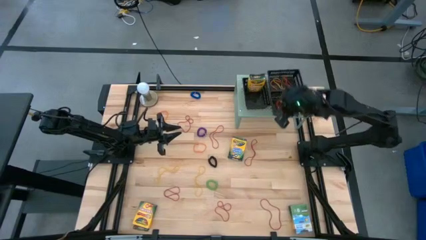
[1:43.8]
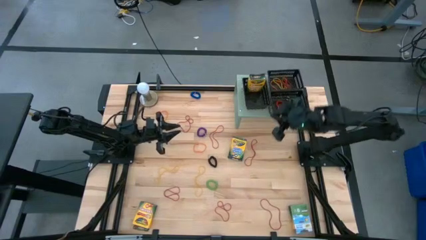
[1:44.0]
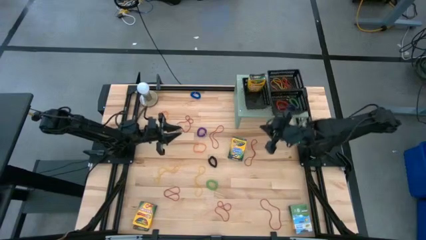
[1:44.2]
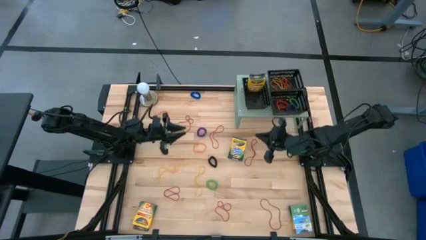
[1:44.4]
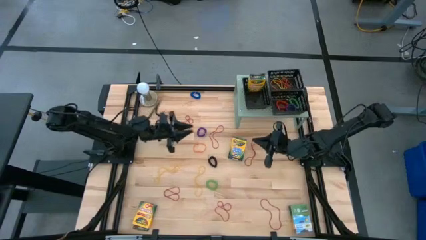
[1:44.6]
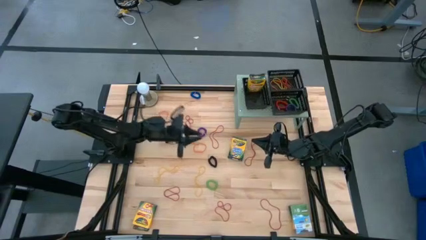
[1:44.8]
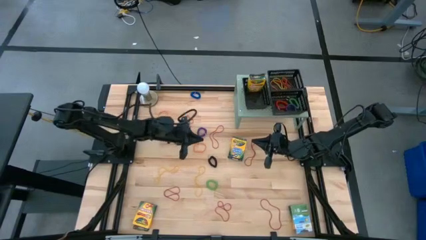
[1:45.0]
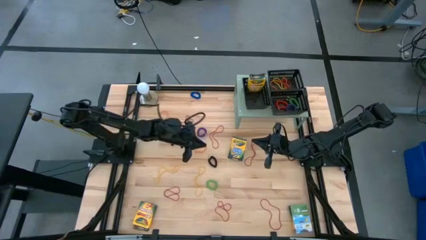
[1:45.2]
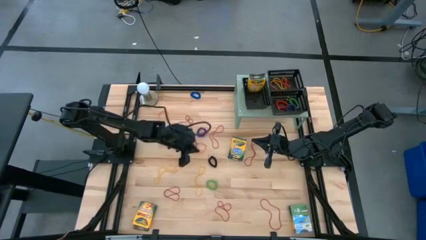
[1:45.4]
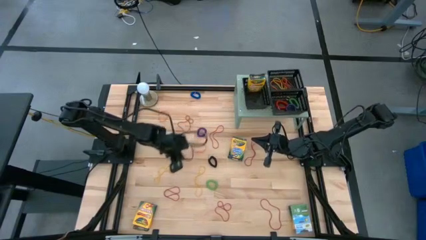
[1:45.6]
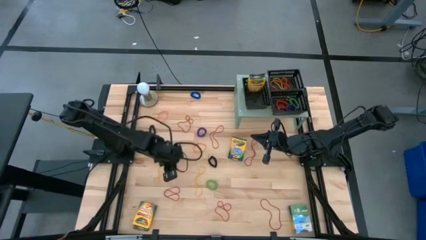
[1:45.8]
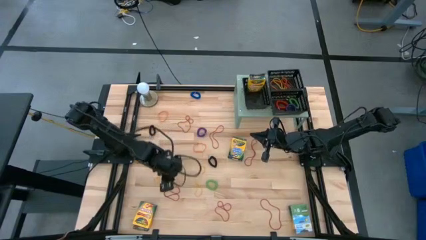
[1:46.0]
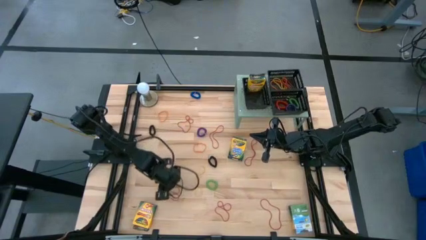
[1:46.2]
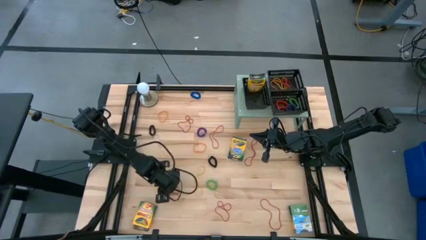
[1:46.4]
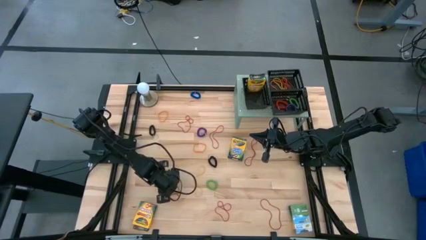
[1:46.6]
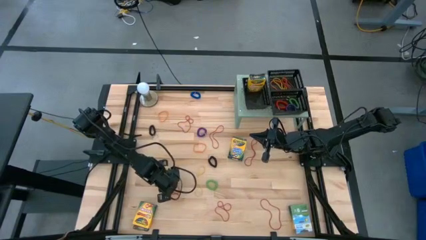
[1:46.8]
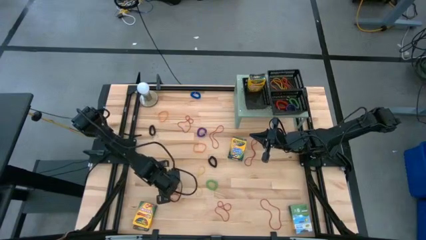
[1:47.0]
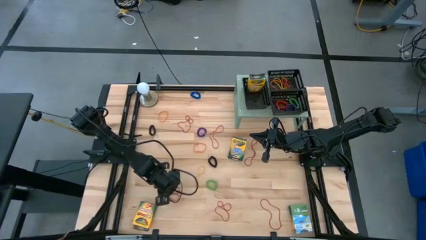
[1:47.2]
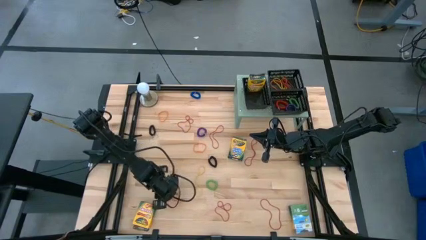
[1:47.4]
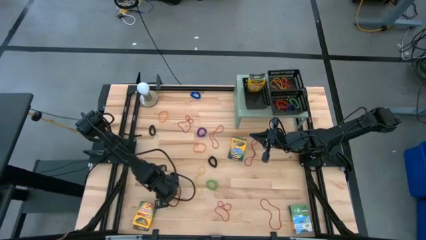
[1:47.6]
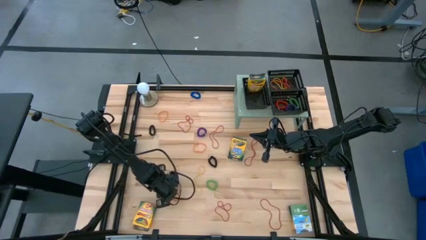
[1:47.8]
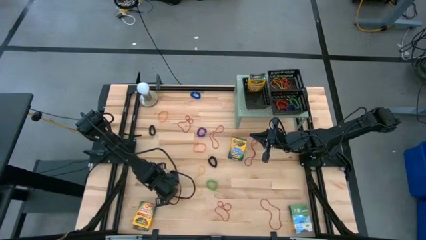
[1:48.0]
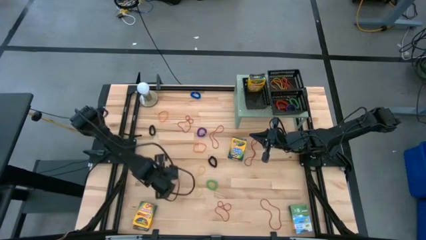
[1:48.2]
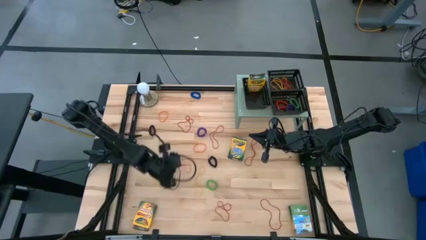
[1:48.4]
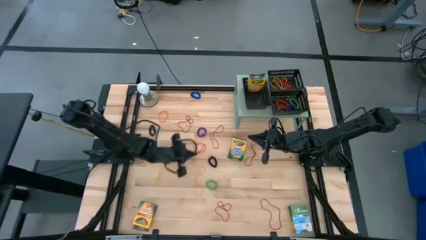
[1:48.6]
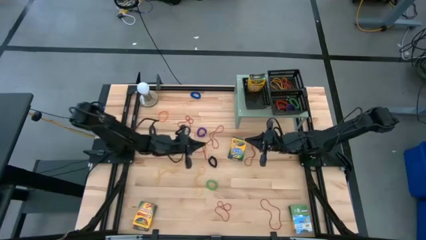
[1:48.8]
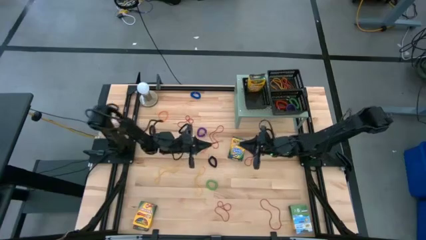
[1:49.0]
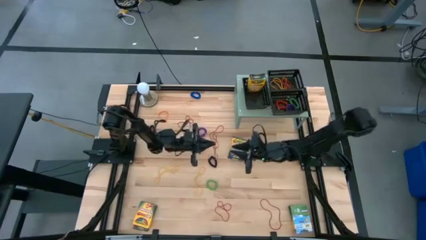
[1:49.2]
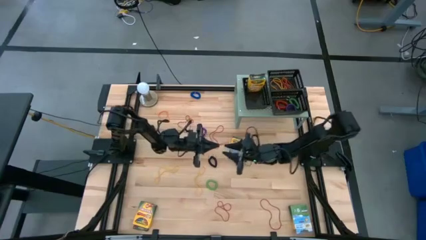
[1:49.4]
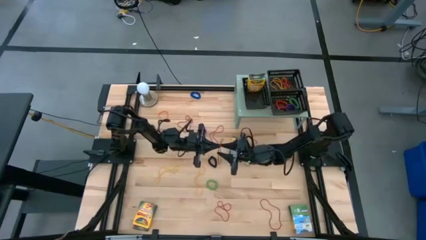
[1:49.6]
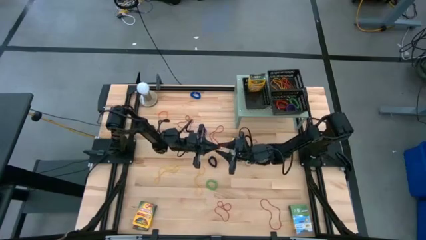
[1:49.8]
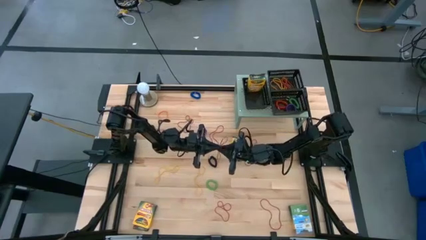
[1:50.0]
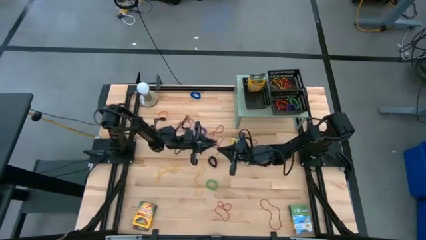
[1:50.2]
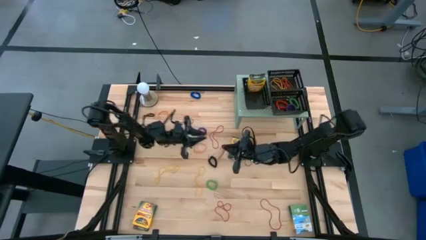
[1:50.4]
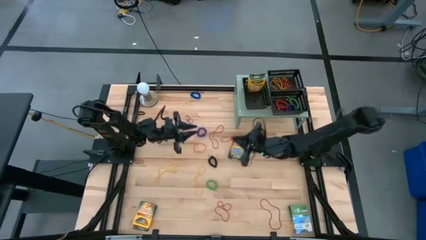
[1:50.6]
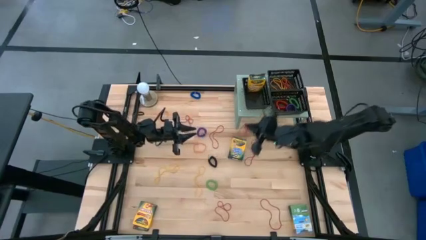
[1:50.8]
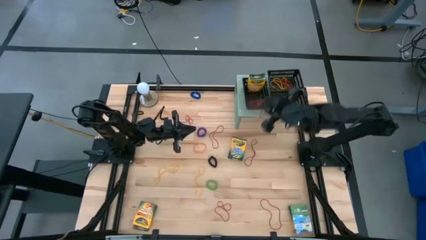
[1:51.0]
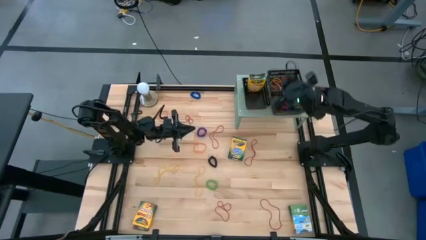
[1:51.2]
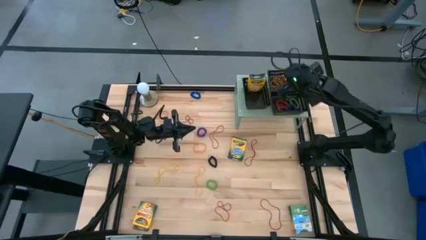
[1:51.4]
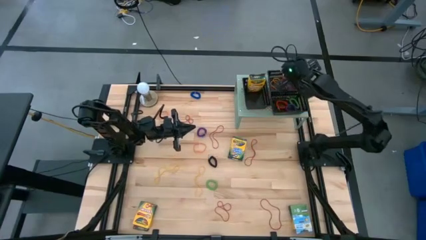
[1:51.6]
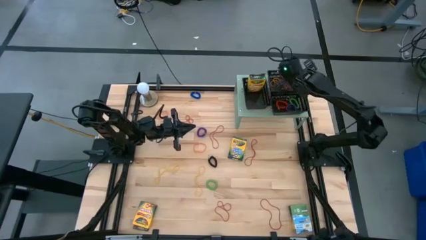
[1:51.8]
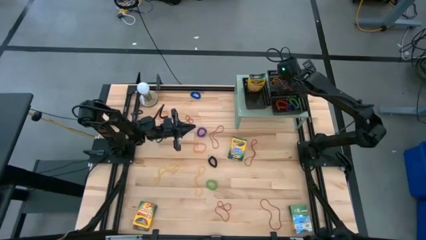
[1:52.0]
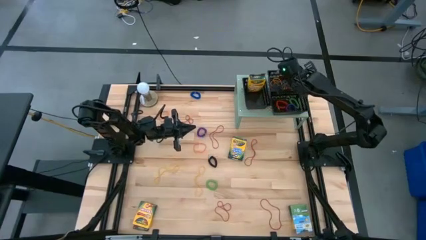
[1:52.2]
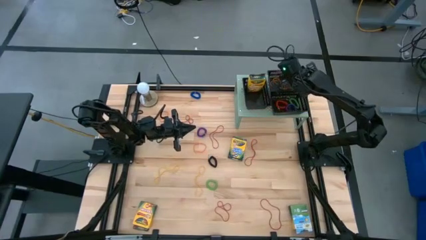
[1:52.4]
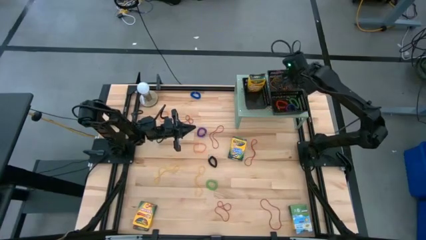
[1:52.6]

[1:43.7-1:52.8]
Task: Pick & Place Office Desk Supplies
Put the red rubber band into the top right black bin on the shelf

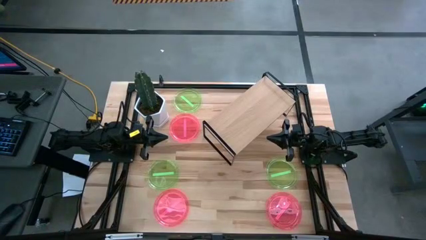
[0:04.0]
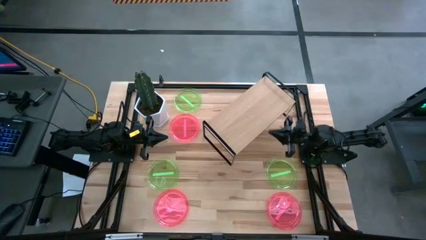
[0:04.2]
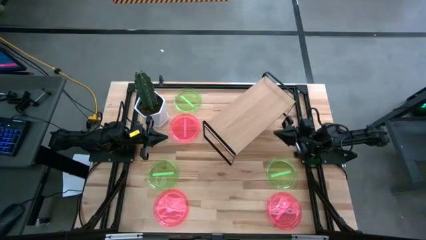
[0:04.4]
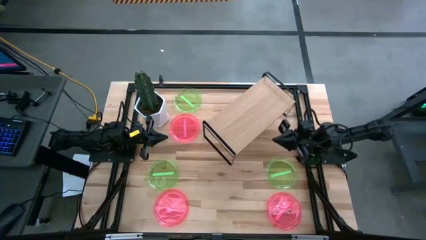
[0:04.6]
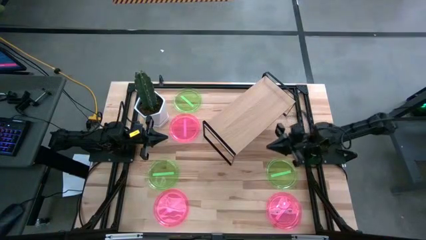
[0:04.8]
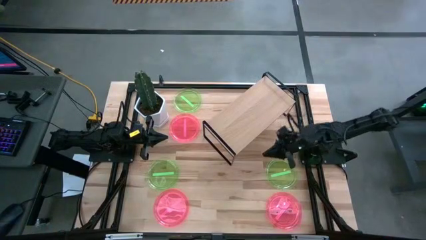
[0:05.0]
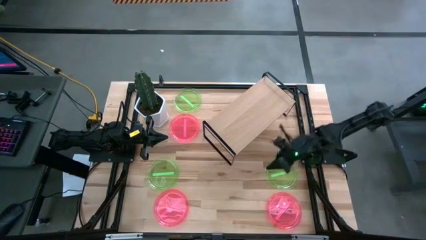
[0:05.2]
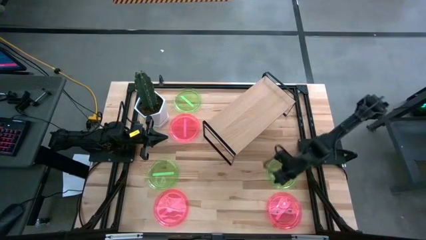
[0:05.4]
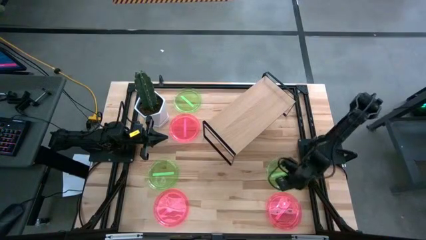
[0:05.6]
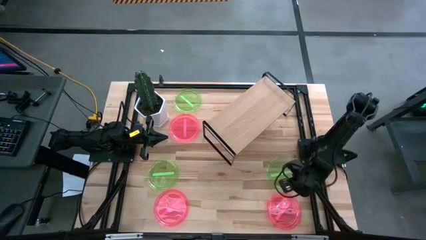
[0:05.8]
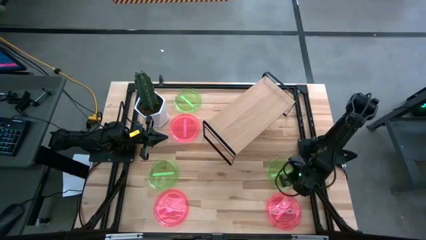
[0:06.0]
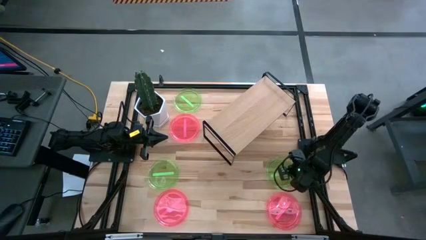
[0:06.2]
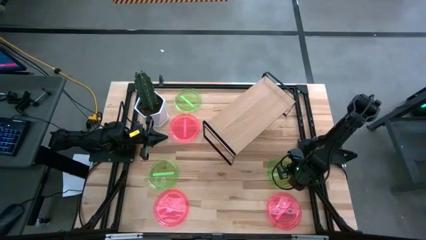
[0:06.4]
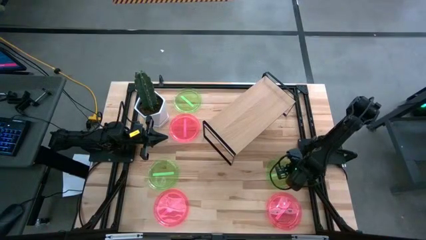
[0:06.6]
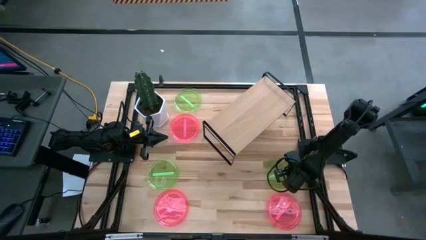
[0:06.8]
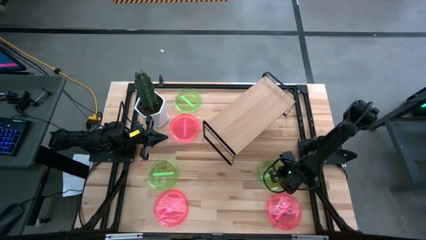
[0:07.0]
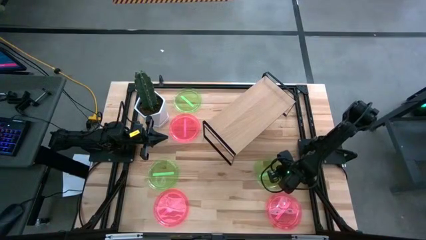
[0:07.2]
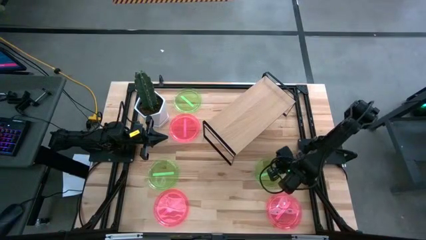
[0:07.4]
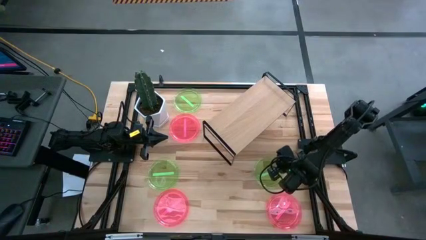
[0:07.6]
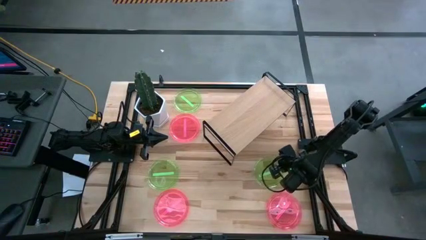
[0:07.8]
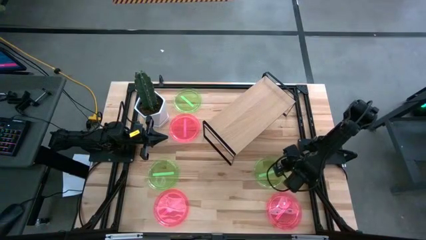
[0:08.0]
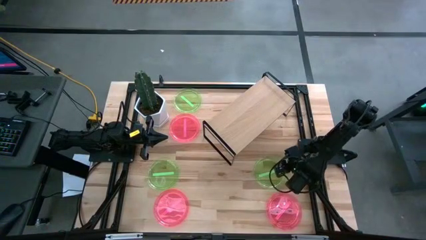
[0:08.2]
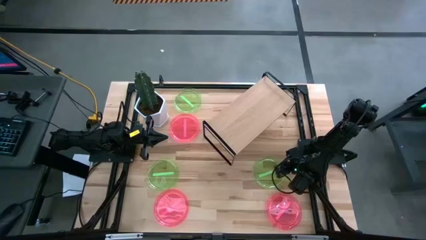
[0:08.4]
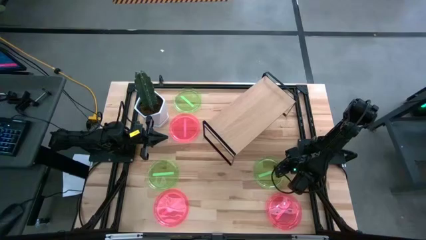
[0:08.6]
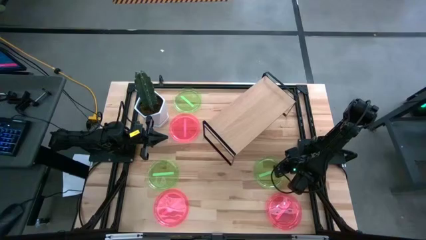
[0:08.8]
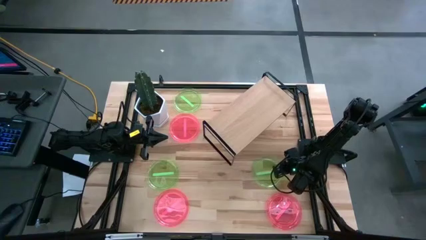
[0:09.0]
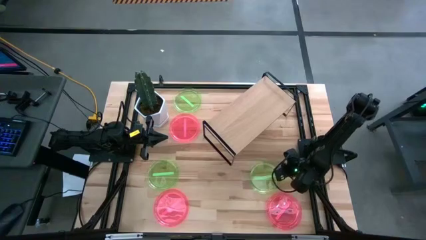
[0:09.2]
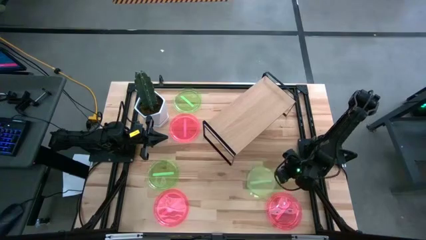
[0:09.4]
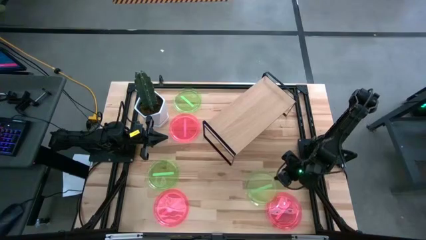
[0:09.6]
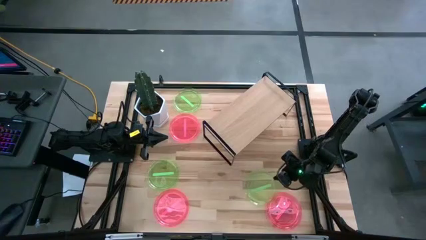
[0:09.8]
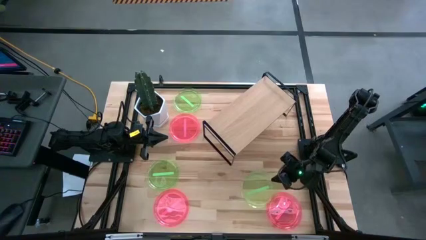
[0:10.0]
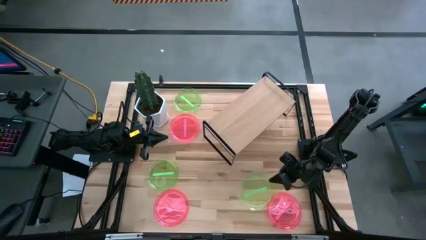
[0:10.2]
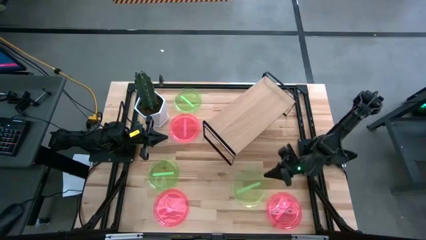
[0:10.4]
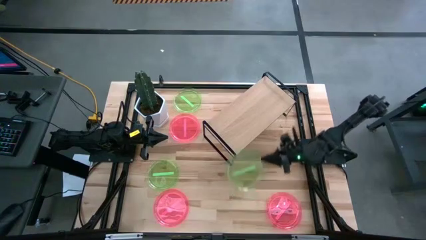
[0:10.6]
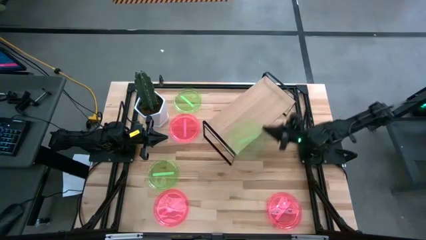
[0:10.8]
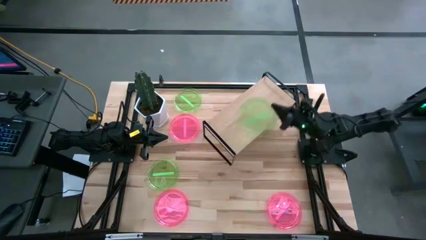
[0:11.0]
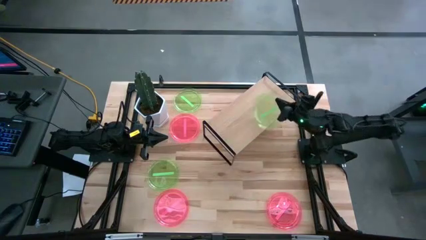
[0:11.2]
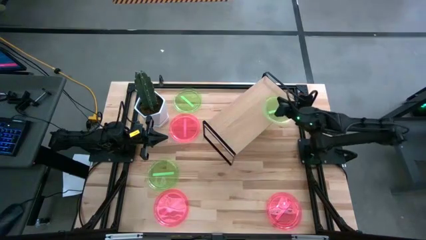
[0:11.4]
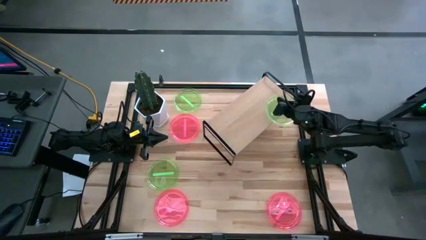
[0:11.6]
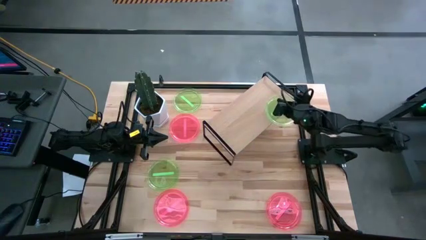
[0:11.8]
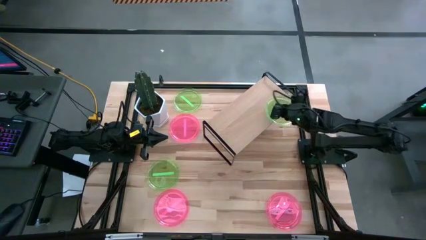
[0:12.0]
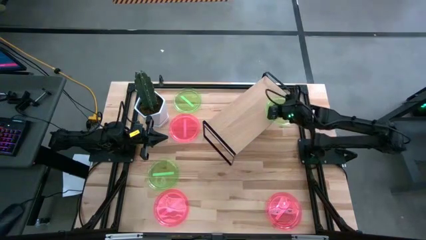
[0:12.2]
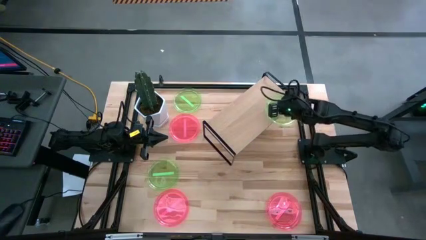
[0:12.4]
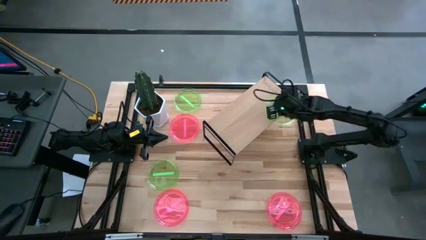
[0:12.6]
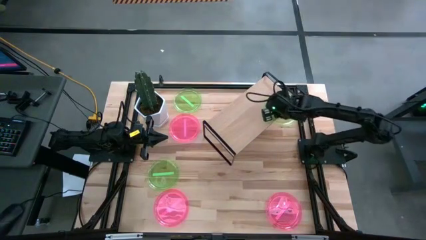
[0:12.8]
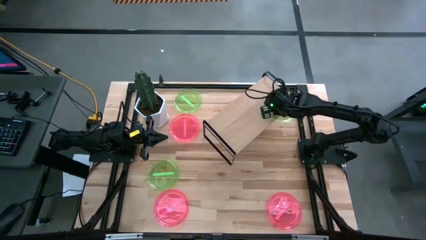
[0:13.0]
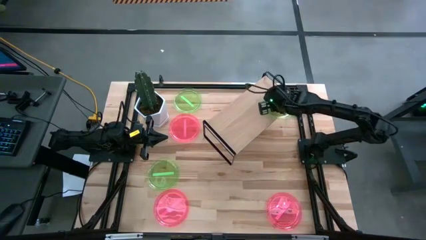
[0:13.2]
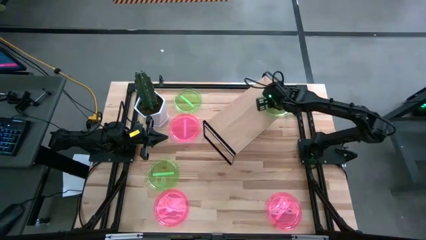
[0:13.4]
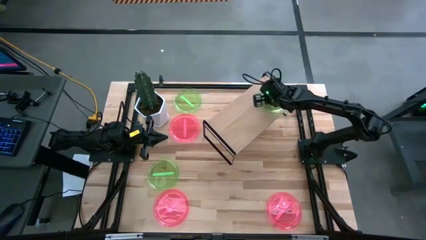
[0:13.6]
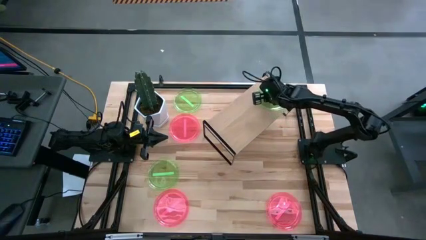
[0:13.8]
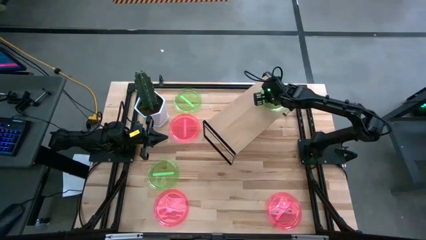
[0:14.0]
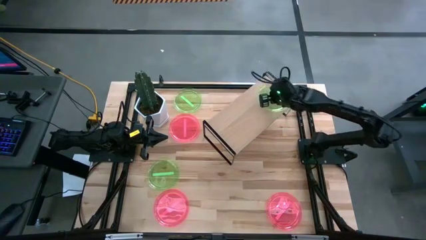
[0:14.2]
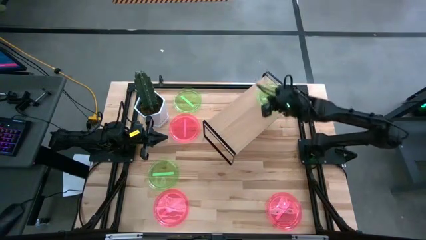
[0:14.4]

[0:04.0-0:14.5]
Task: Place and stack plates onto a shelf
Put the bottom right green plate on the shelf
